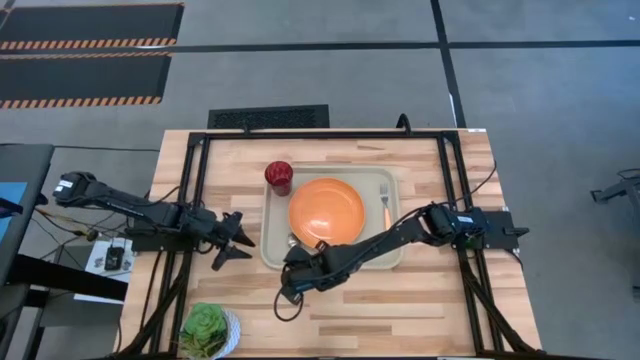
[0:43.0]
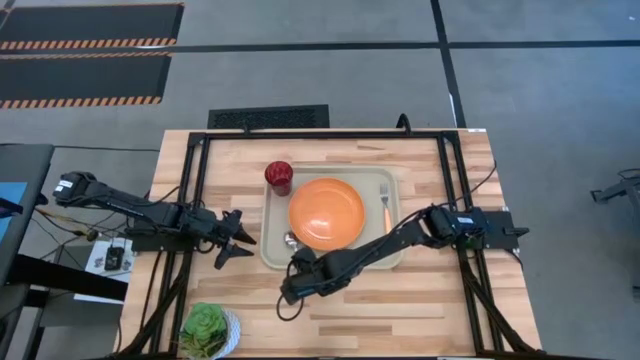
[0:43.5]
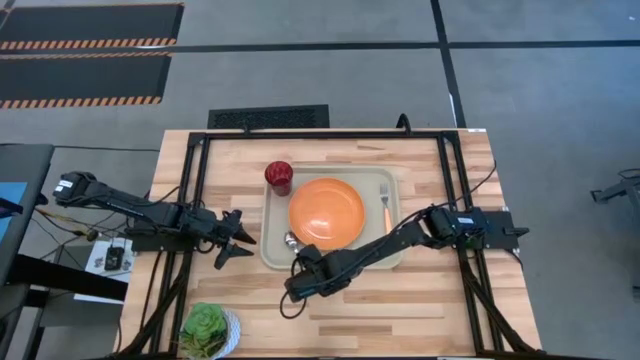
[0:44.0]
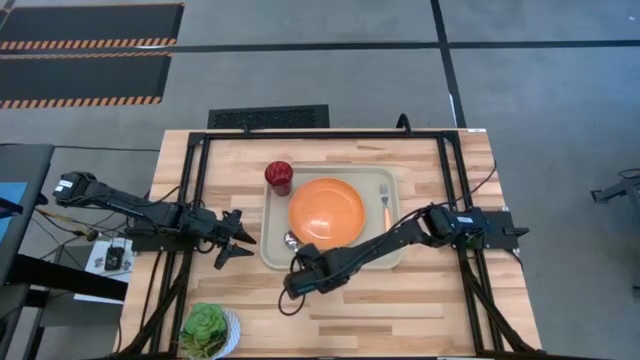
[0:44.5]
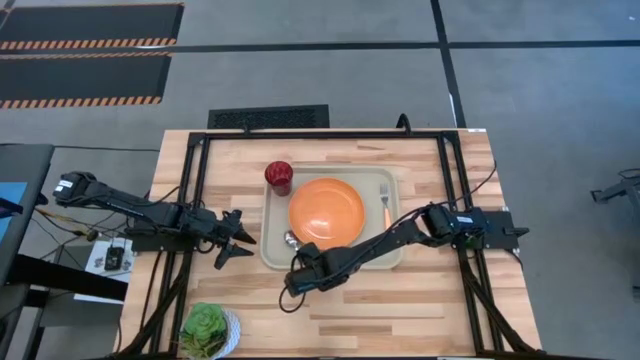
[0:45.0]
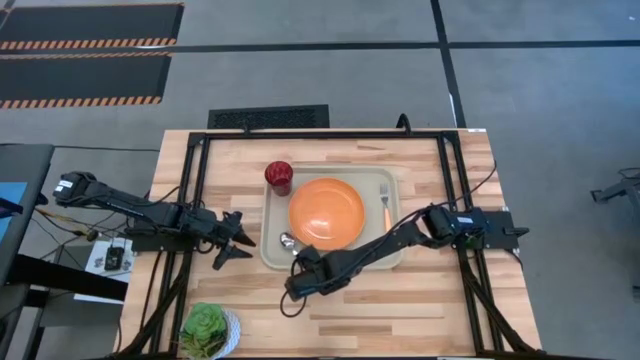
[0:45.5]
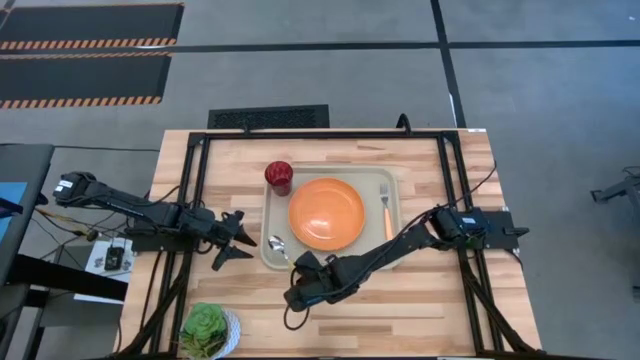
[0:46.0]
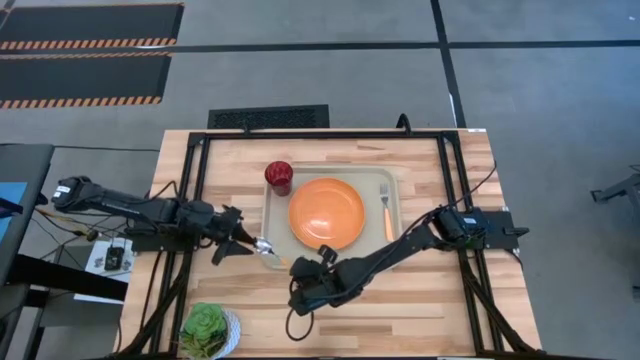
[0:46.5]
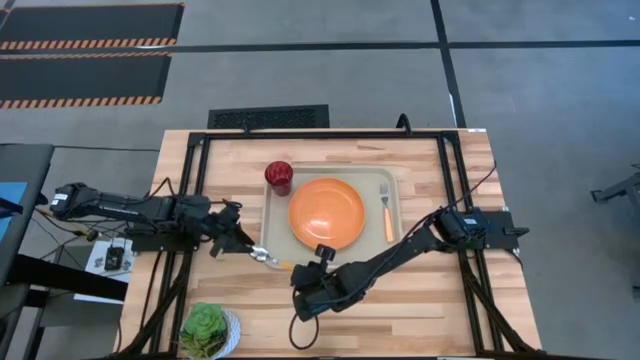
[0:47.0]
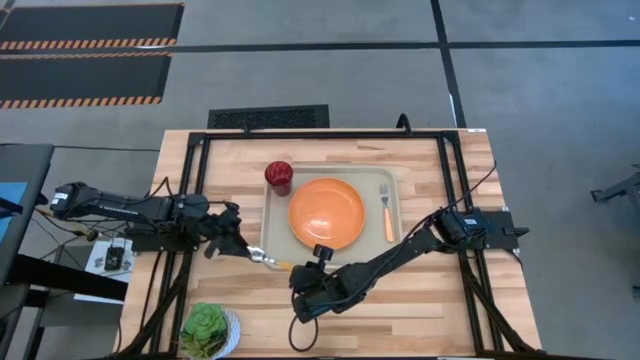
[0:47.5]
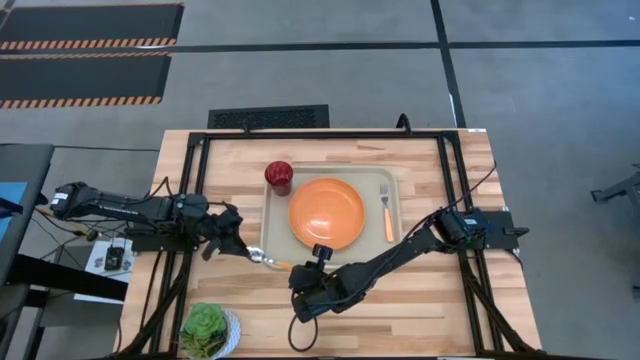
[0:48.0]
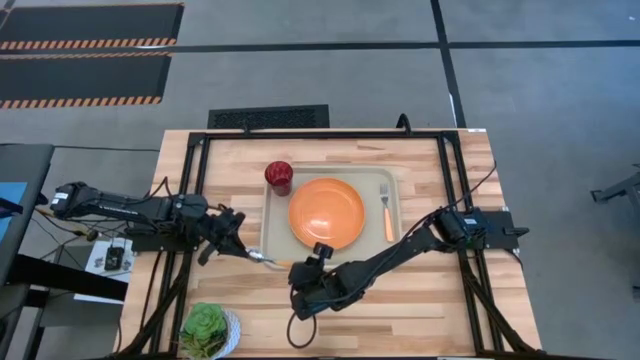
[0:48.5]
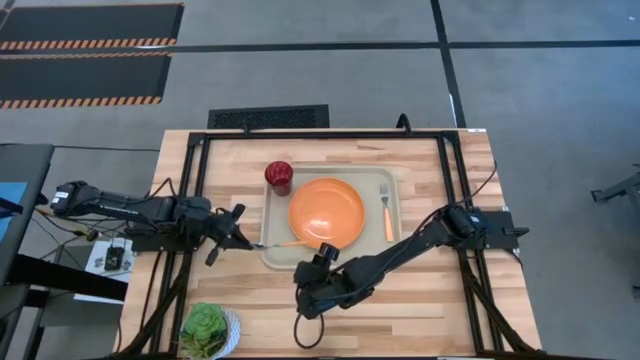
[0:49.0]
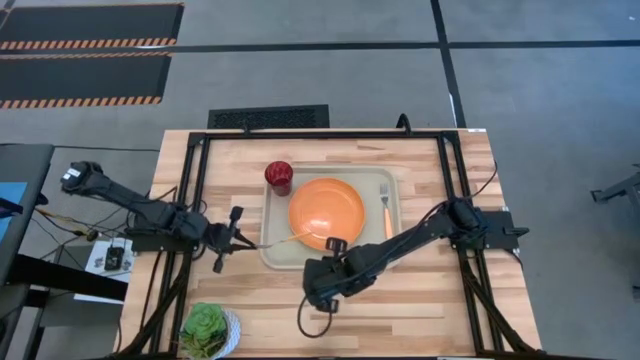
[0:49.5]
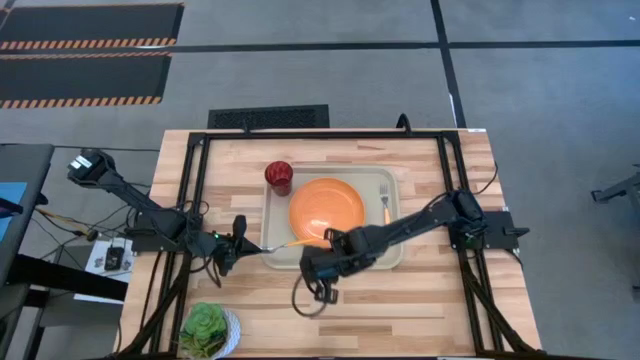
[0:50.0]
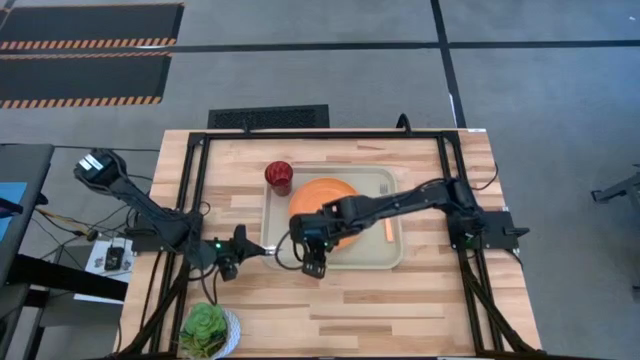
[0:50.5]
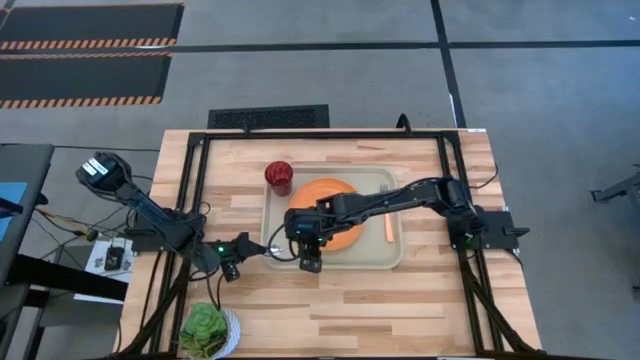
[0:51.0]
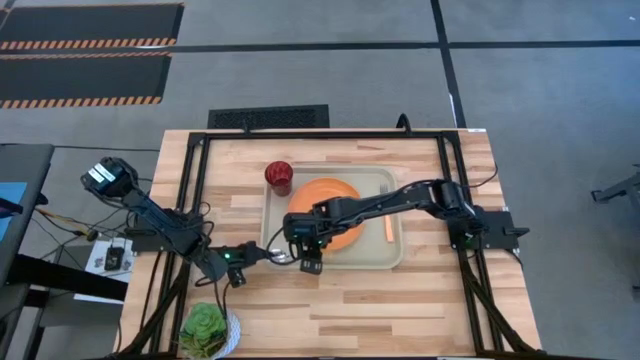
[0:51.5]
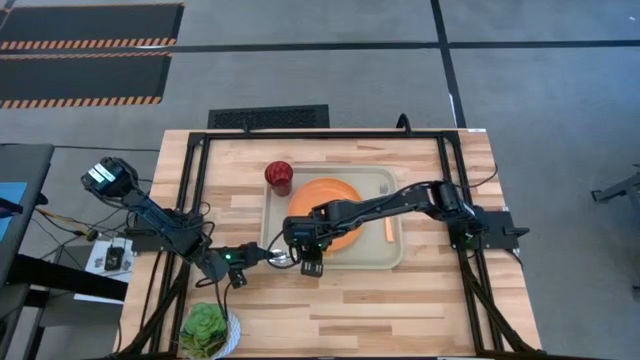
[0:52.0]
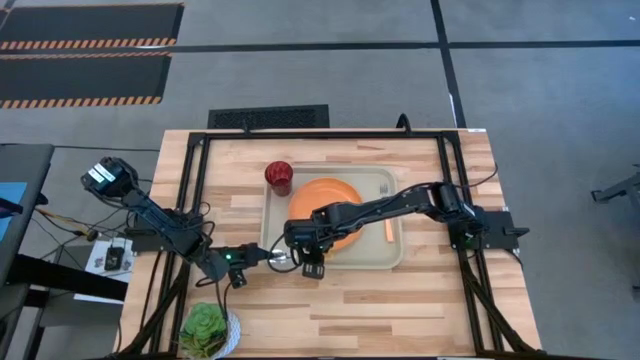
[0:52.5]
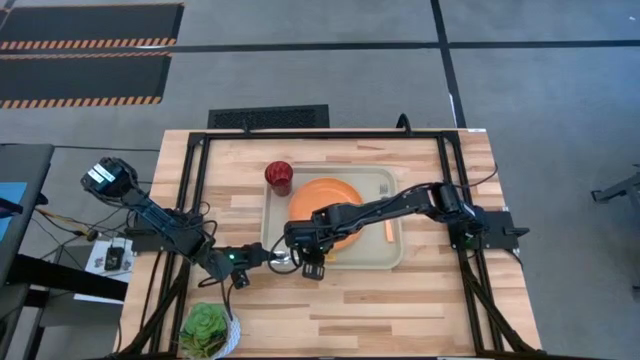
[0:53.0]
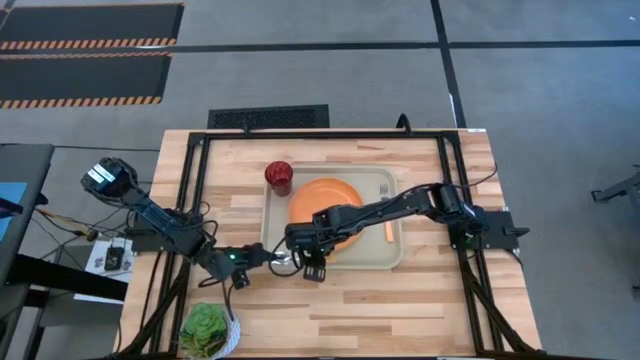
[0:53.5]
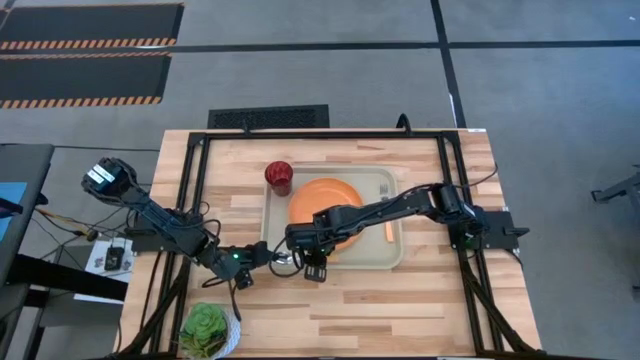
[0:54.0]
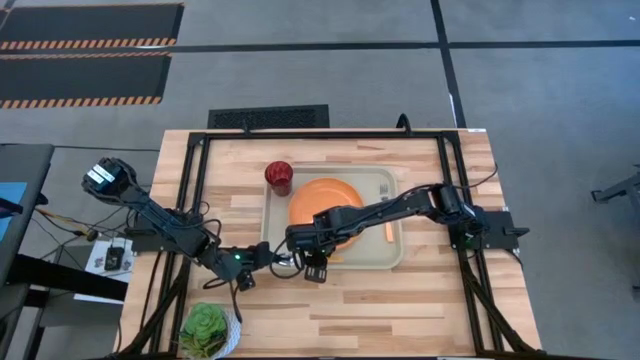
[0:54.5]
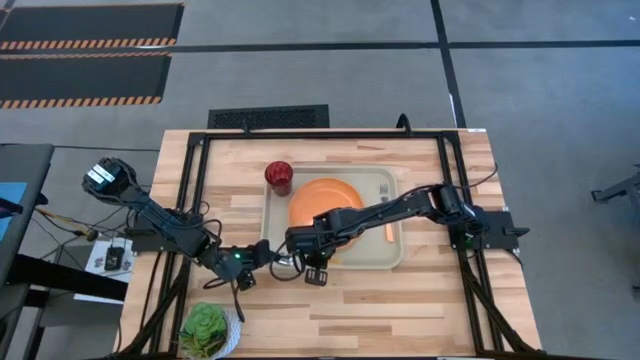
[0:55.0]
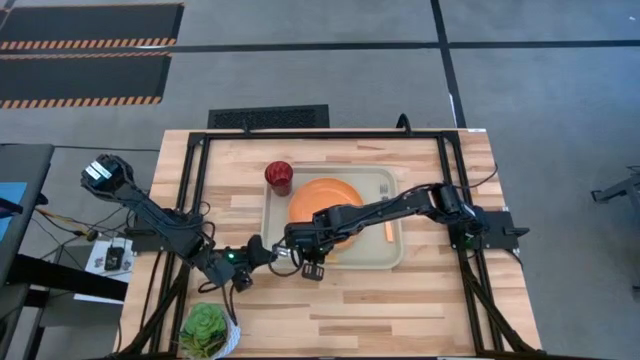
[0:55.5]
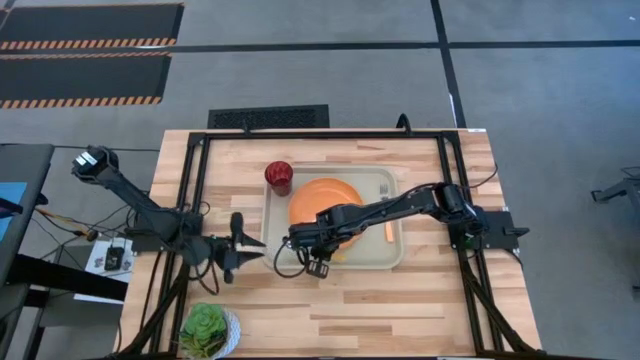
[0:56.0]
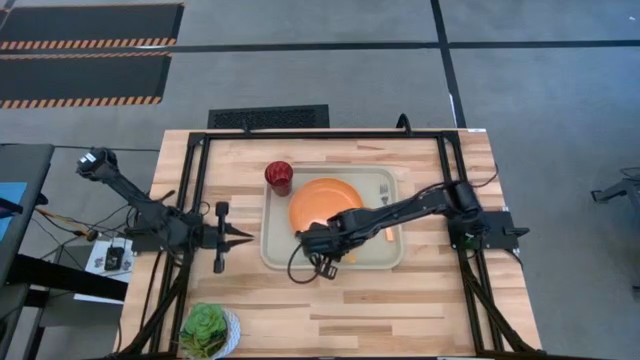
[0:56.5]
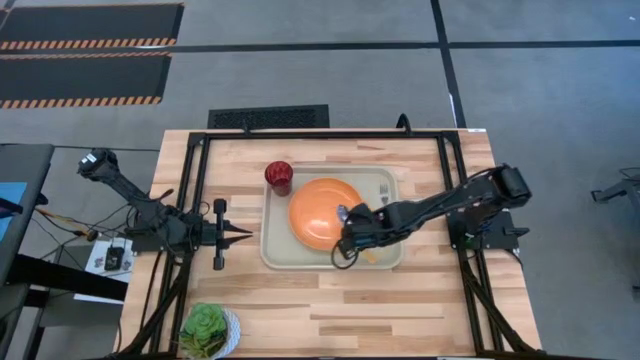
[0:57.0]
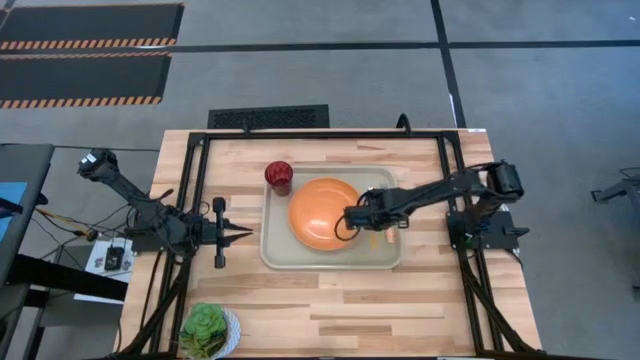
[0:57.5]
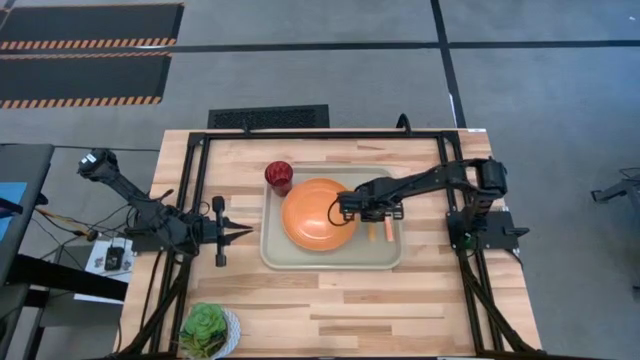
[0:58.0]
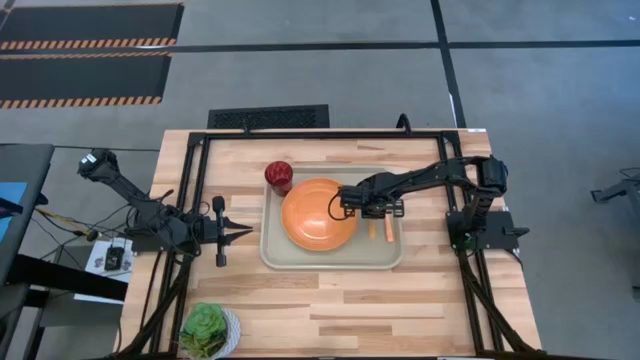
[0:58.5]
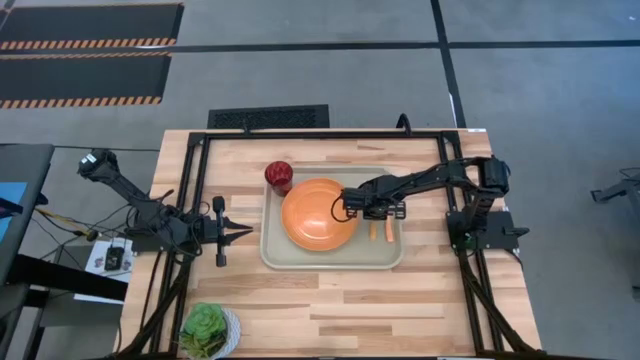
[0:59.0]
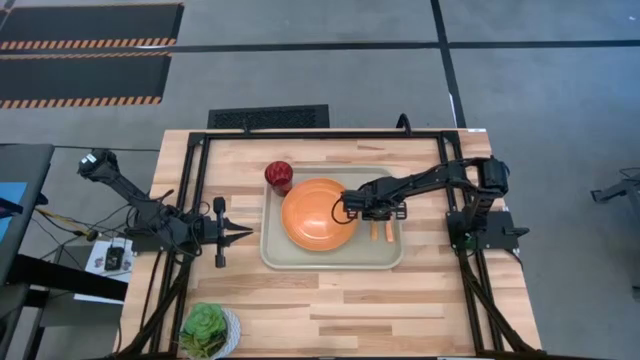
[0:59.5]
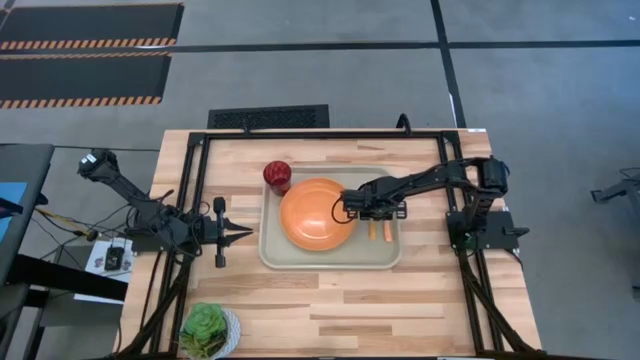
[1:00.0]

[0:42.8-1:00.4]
Task: Pick and place plate/cup/fork/spoon on tray
Put the orange spoon to the right of the orange plate on the gray serving tray

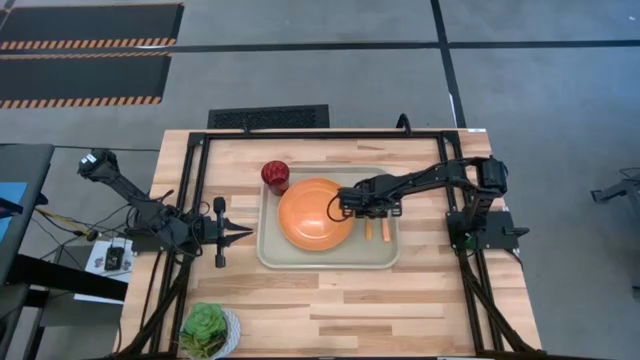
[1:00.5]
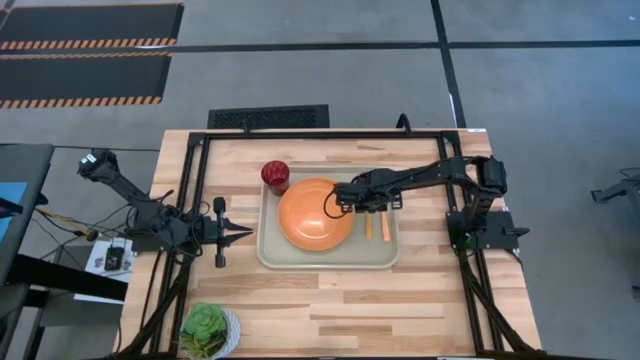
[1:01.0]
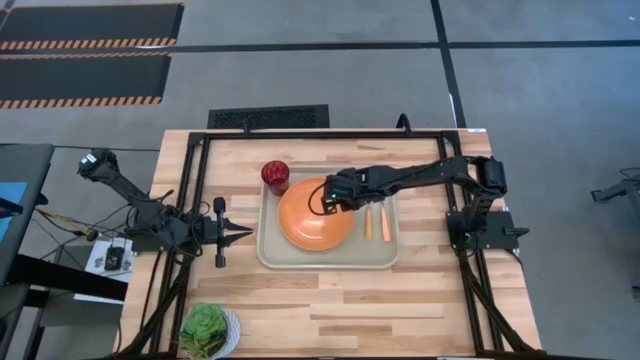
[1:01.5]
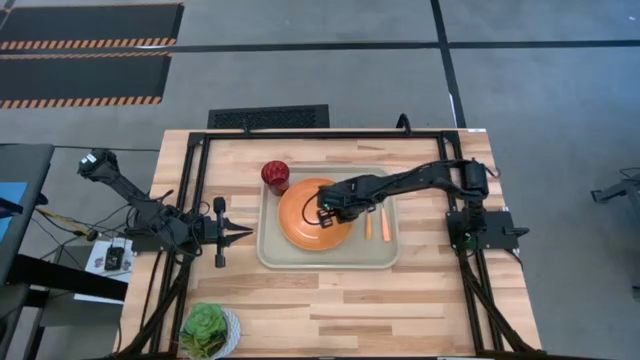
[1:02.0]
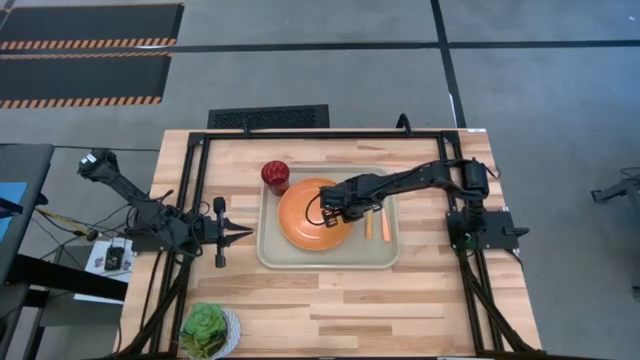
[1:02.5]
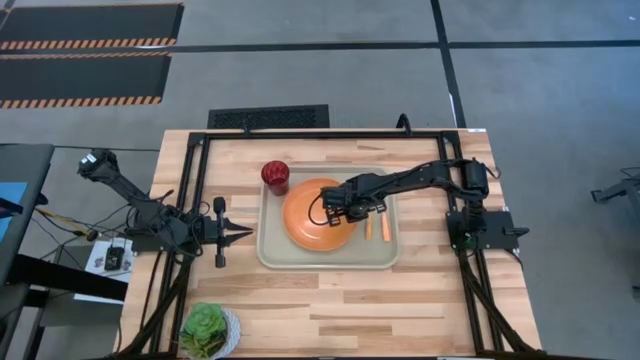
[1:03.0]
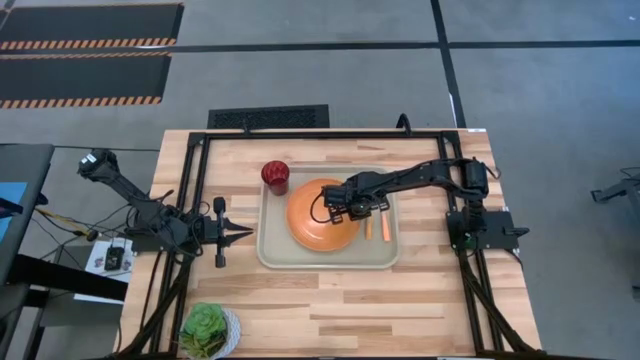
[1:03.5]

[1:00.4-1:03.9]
Adjust the orange plate on the gray serving tray
